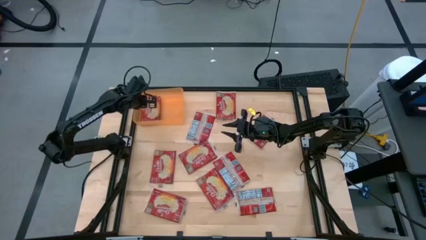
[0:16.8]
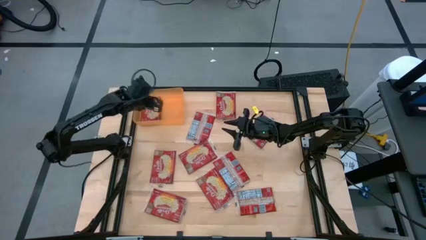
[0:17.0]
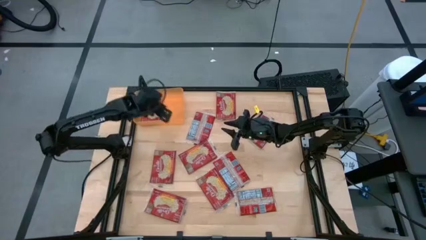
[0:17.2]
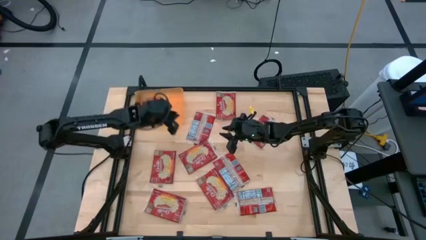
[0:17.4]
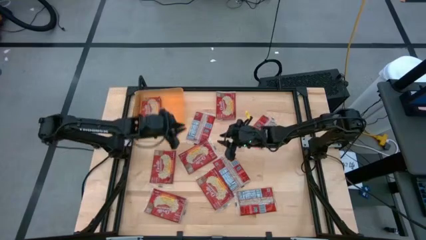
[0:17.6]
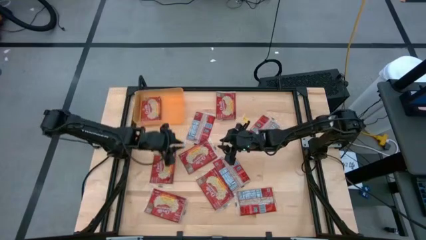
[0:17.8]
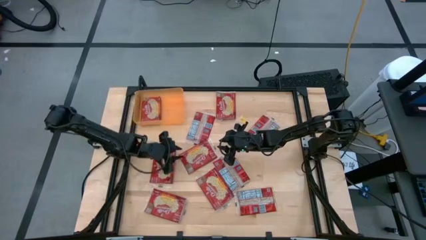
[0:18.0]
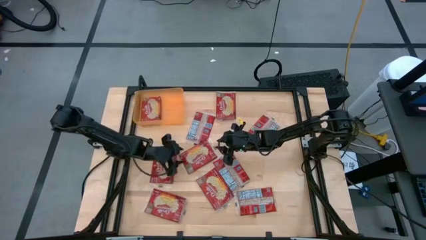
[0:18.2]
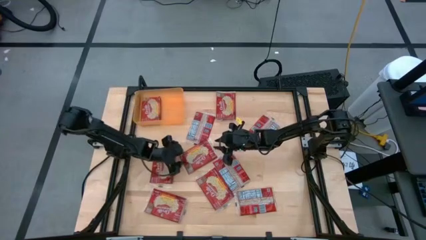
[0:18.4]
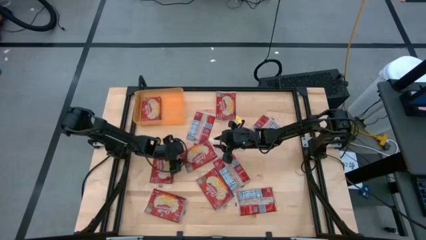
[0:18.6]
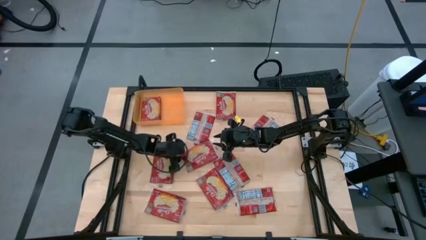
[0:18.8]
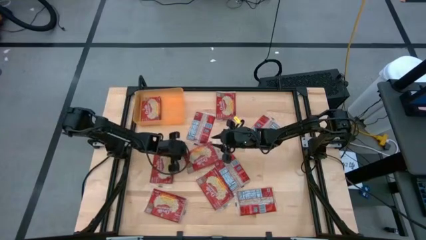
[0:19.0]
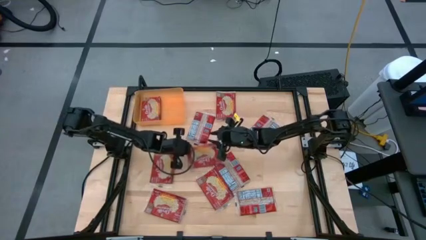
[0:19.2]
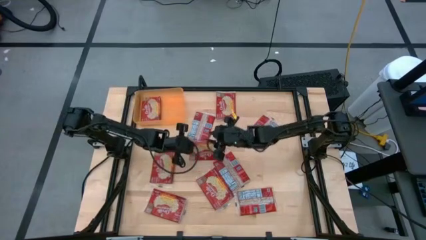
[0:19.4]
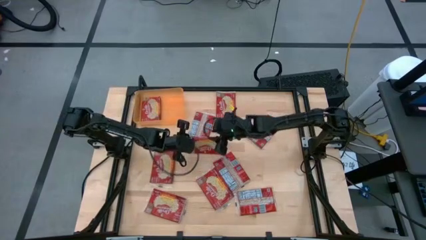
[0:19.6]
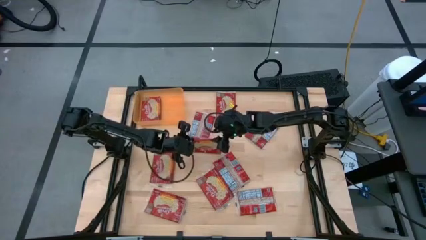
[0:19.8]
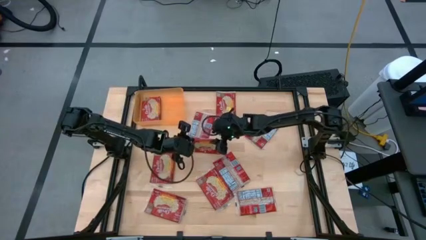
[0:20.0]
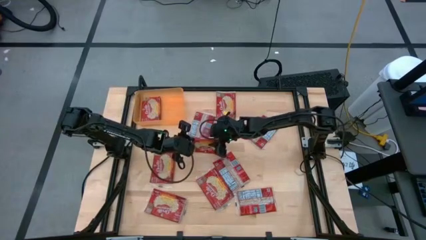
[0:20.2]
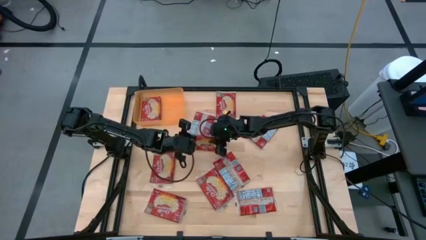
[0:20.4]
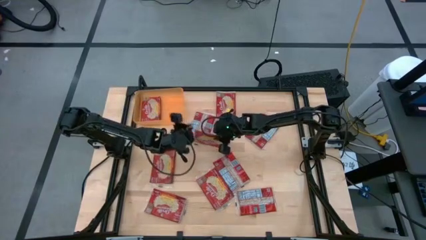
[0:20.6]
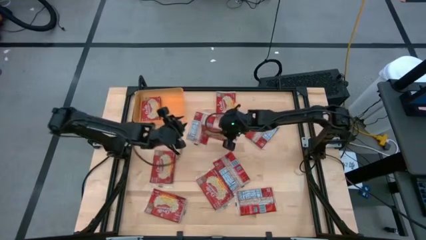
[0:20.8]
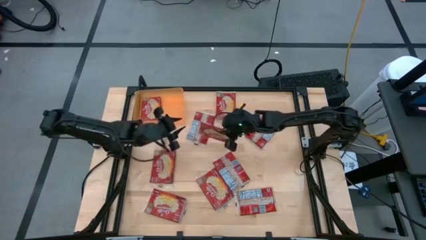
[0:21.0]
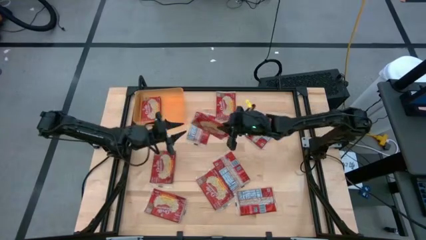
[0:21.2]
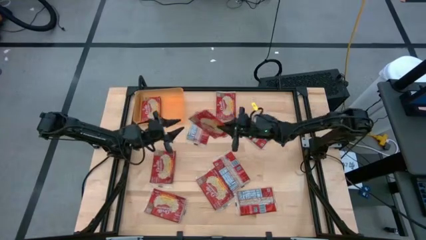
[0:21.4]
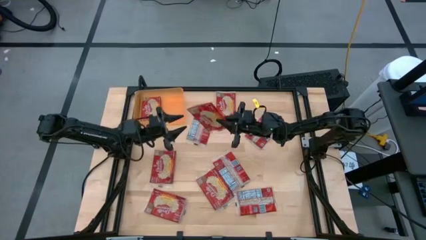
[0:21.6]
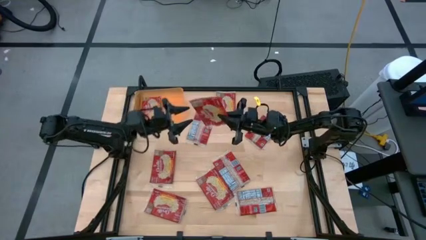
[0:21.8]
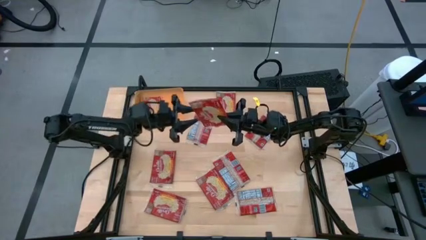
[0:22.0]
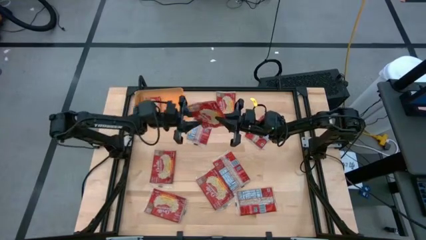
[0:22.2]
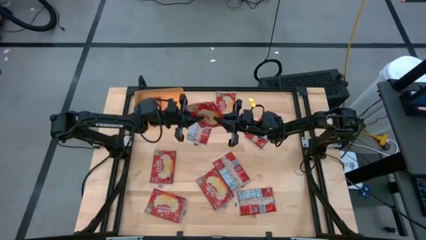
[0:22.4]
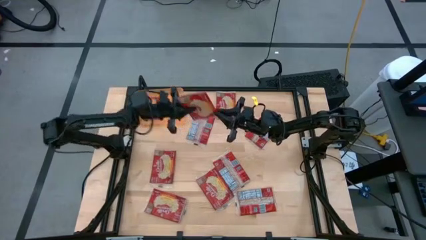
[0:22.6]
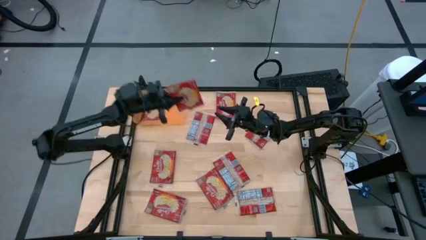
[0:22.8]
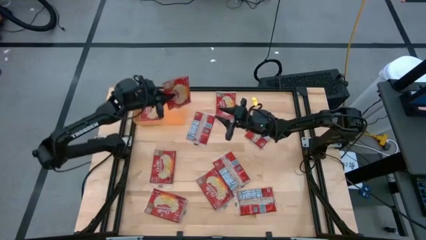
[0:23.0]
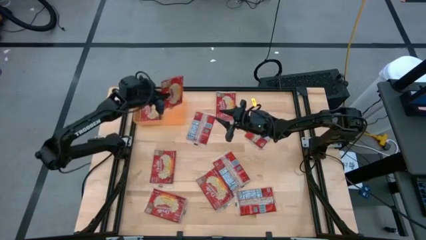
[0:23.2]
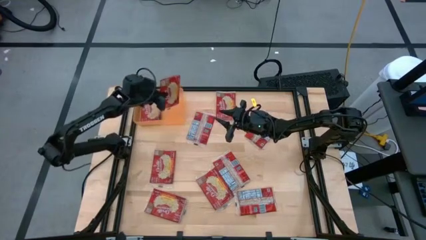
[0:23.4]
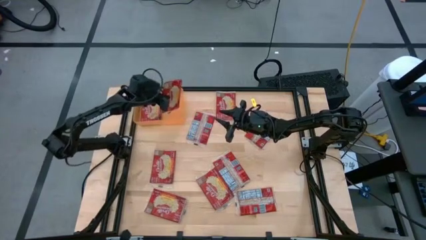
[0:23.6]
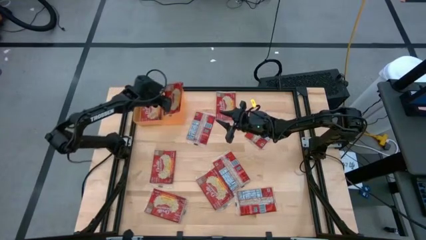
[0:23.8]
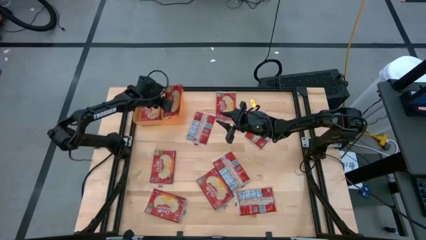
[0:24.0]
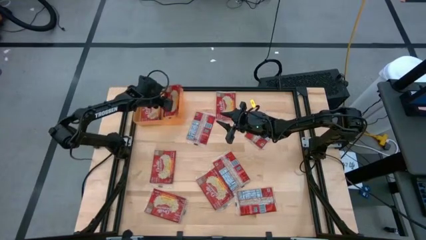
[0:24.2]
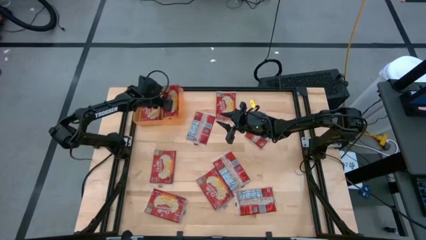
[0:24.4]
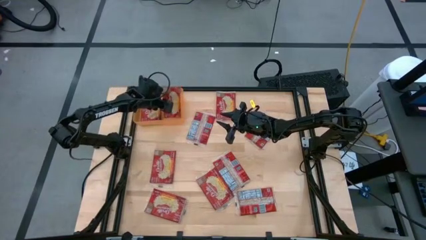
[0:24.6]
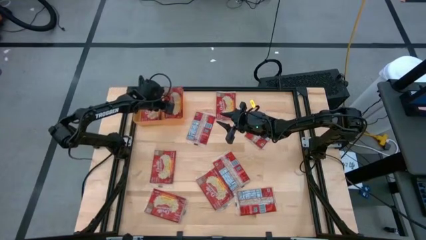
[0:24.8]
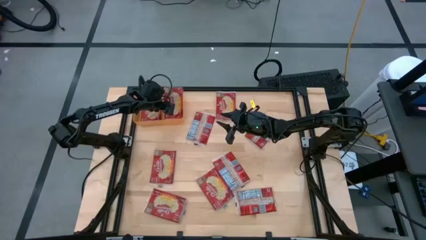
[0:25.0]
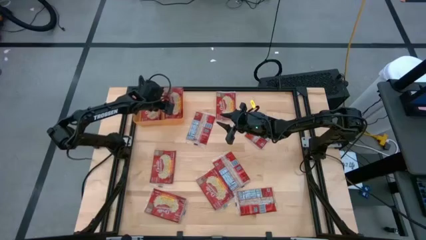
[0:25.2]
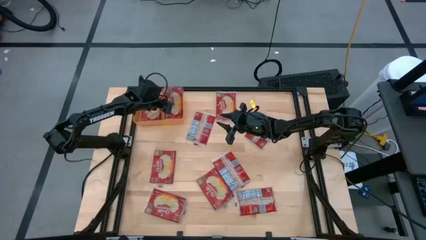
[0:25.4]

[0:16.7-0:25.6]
Task: Sort popcorn bags into baskets
Put the red popcorn bag into the orange bin

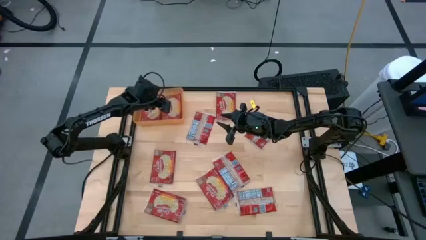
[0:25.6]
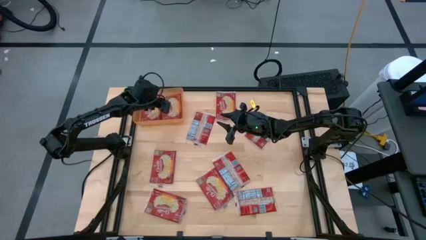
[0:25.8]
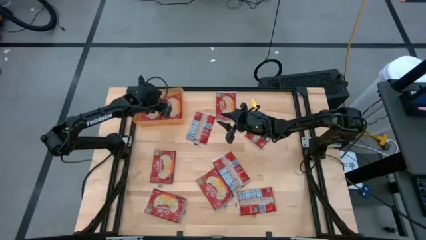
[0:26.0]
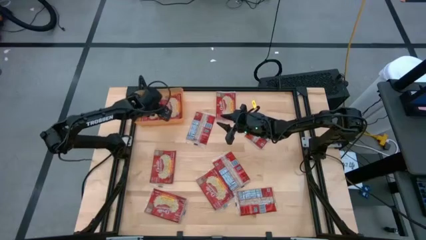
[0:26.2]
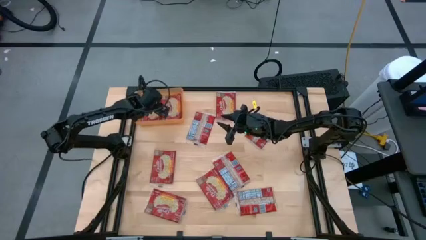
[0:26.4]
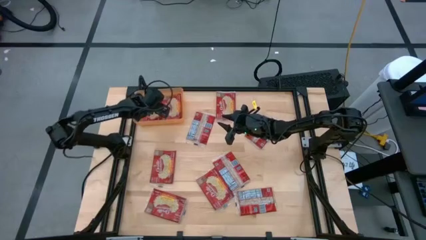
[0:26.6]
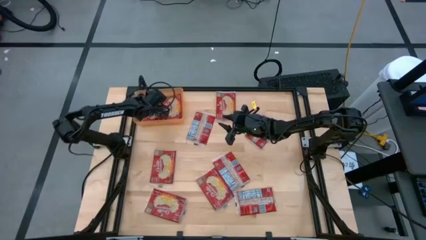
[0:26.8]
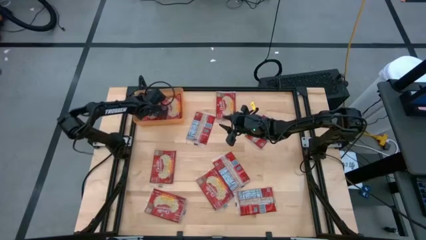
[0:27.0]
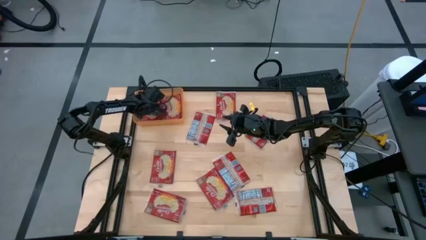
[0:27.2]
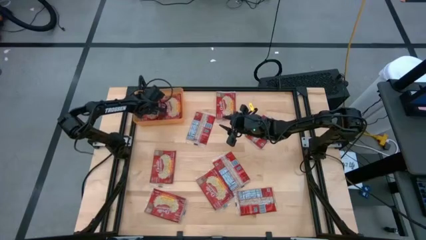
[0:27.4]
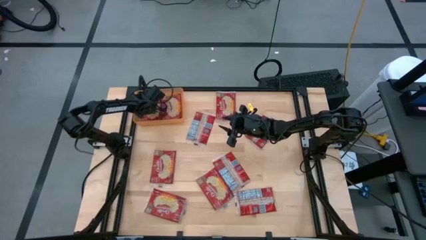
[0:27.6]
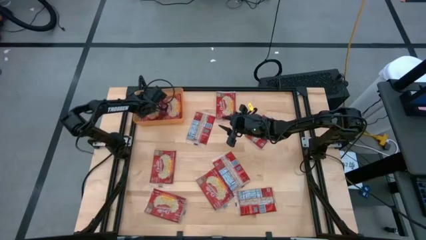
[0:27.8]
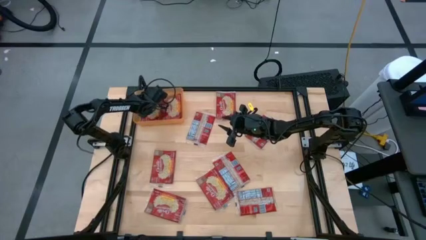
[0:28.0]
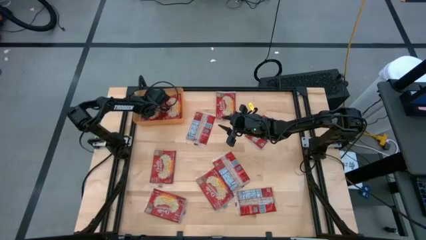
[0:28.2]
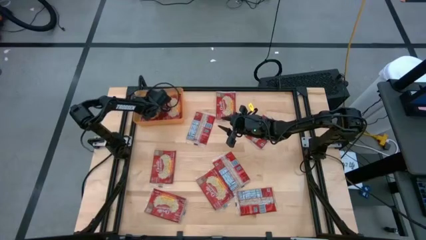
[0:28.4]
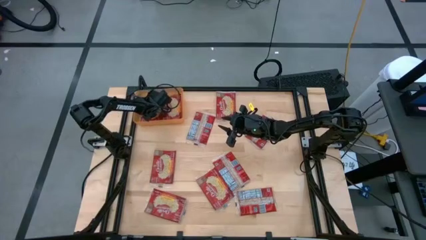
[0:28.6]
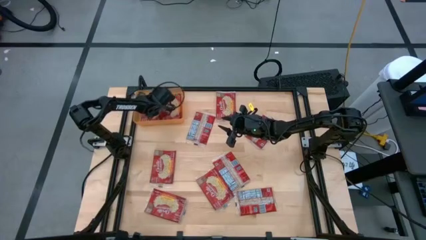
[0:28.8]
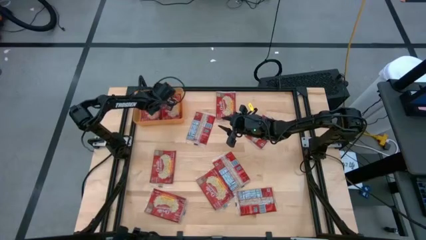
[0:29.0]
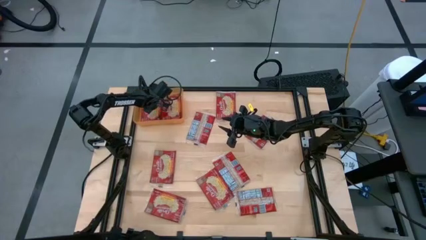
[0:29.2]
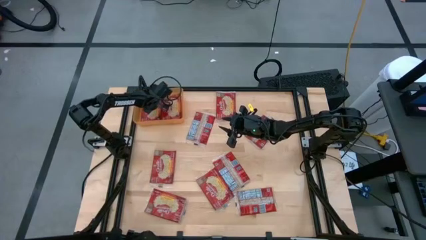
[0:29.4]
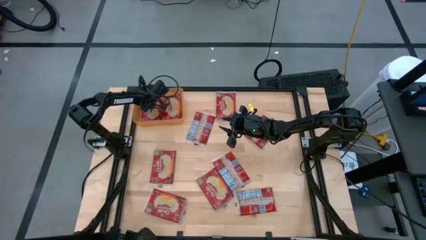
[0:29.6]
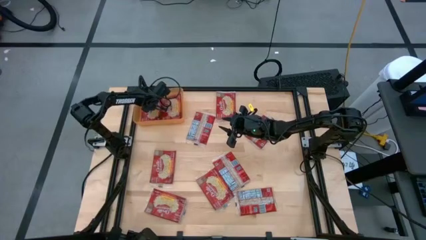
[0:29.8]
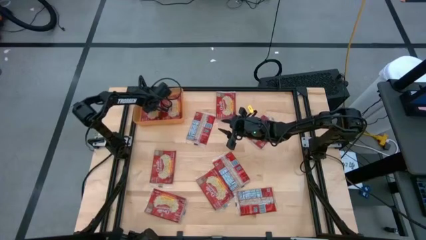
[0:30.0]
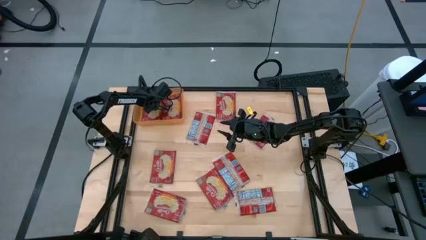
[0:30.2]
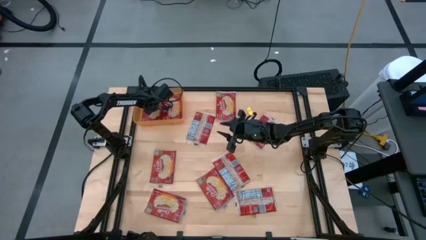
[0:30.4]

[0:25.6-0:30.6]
Adjust the popcorn bag
